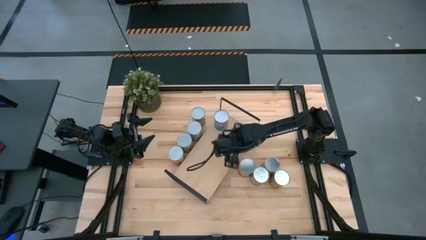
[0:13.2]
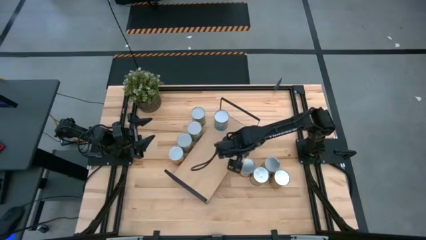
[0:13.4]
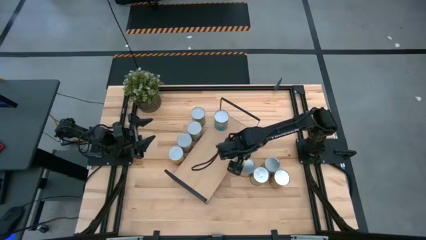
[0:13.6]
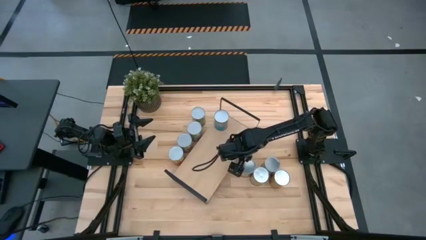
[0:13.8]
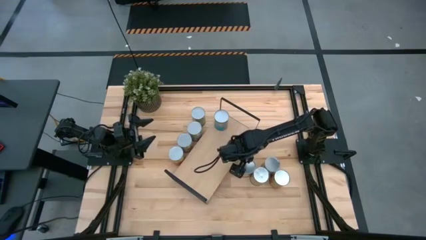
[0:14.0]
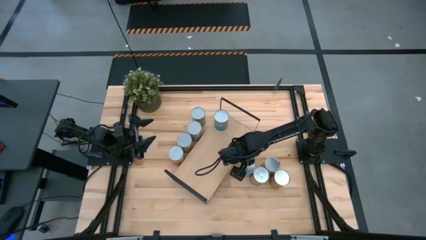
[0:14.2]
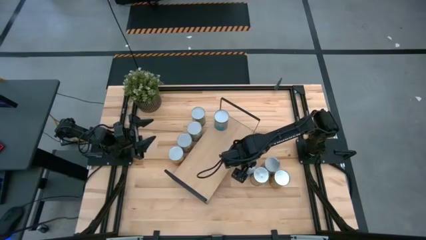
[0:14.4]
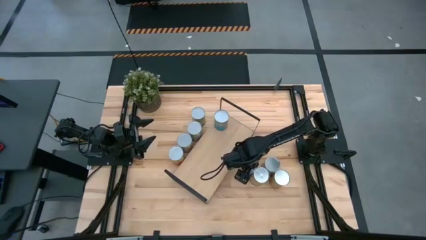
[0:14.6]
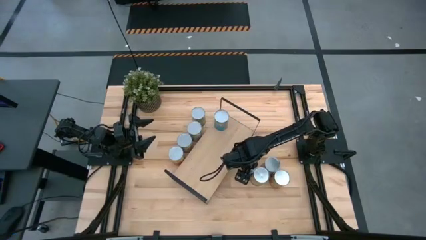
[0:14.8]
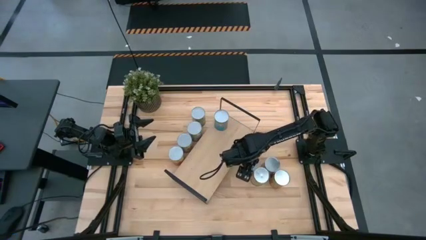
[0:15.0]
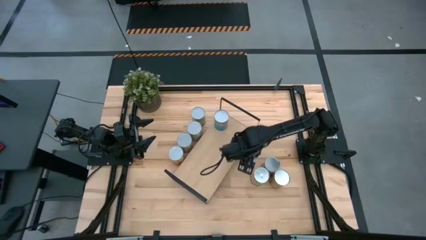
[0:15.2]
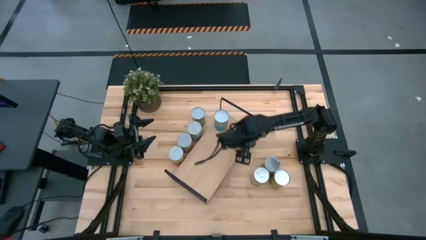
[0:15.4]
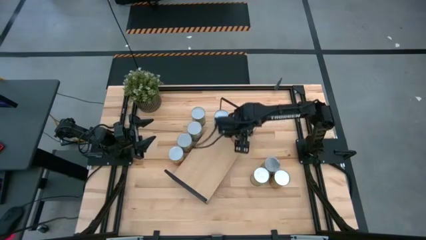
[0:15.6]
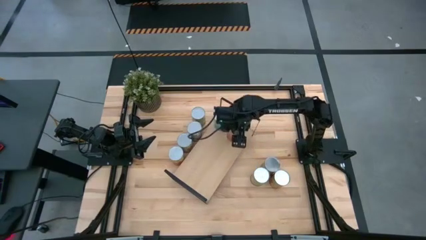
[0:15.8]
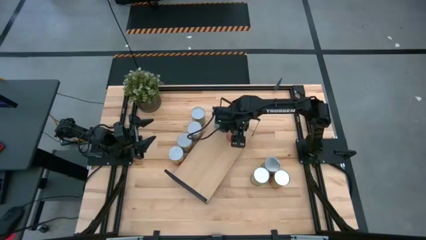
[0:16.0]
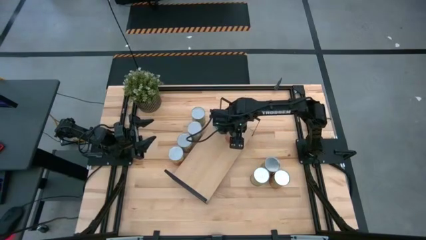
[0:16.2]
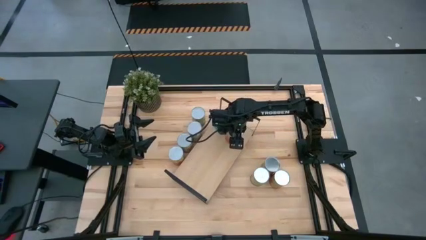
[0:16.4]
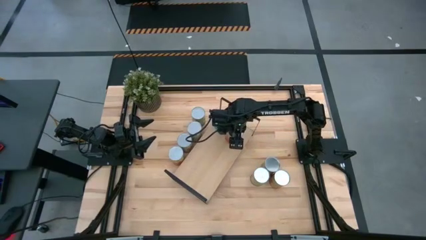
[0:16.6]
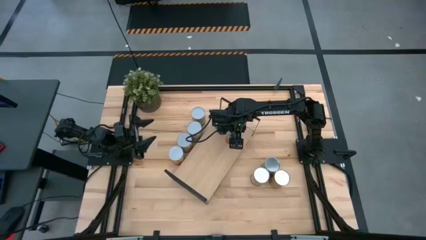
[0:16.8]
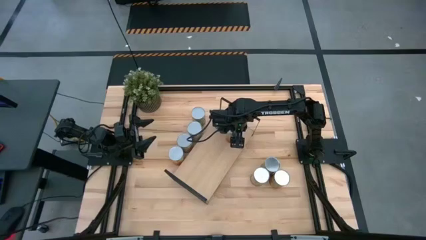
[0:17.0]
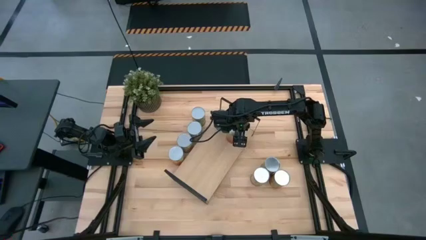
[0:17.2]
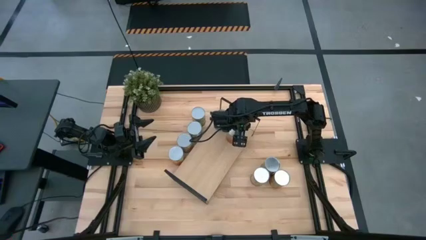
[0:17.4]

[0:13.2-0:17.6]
Task: Pick and place cans onto a shelf
Put the canned corn on the shelf

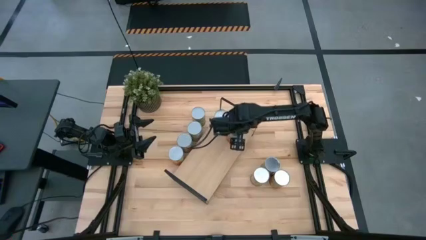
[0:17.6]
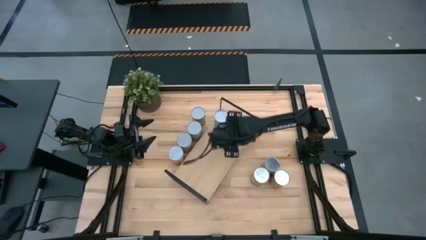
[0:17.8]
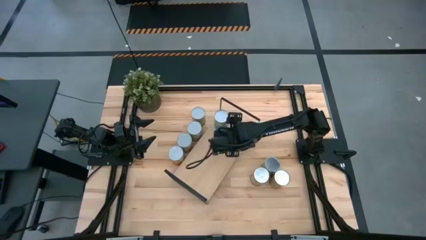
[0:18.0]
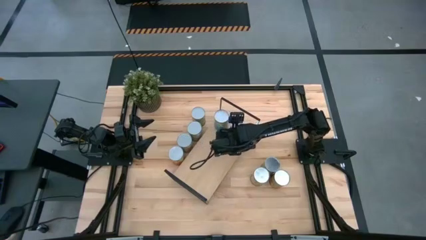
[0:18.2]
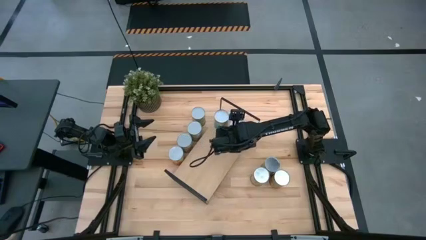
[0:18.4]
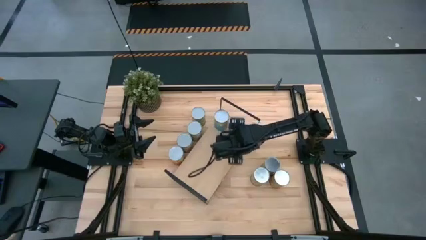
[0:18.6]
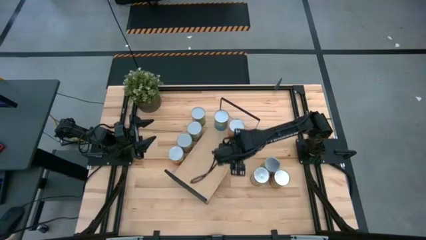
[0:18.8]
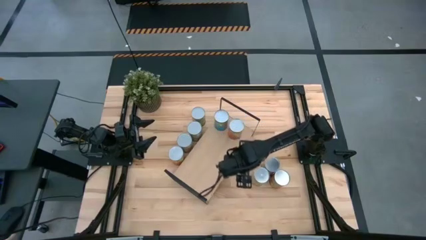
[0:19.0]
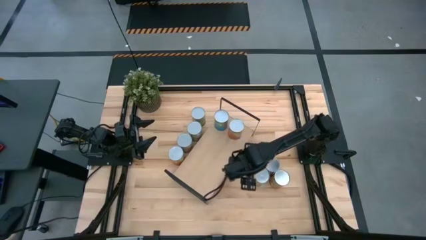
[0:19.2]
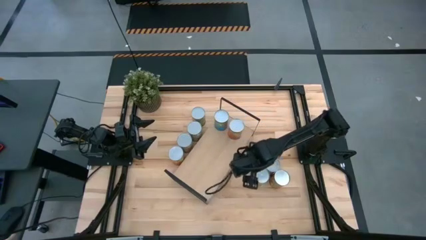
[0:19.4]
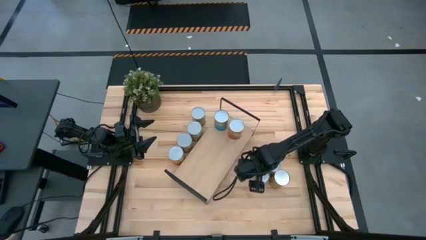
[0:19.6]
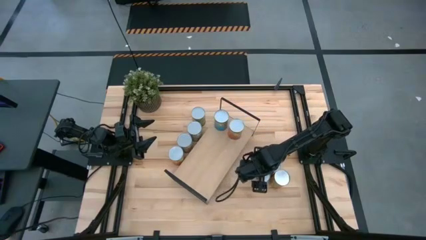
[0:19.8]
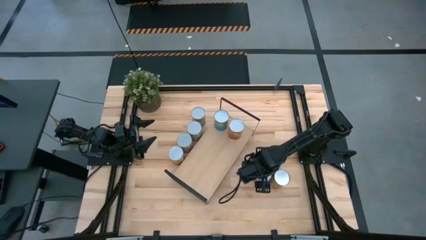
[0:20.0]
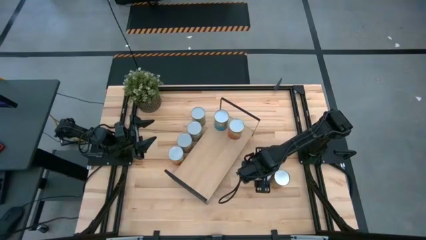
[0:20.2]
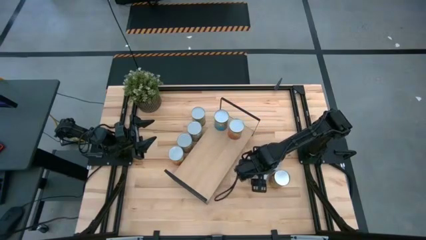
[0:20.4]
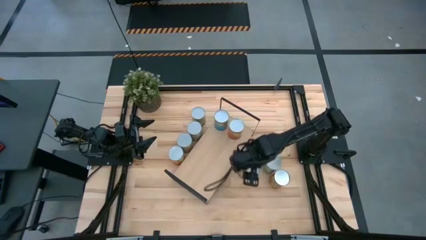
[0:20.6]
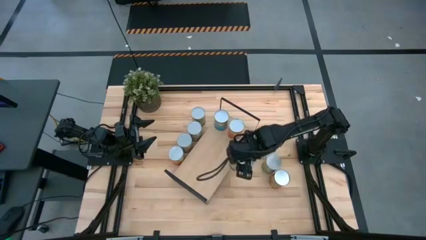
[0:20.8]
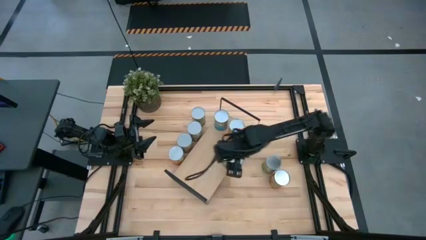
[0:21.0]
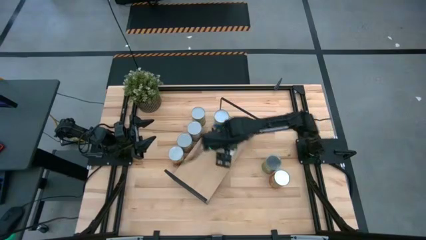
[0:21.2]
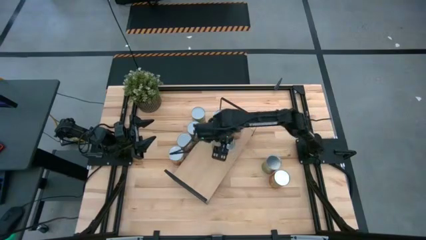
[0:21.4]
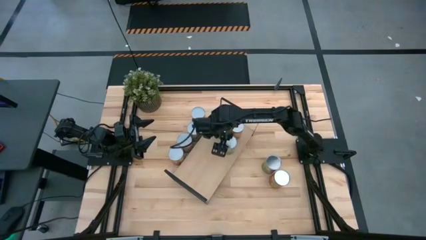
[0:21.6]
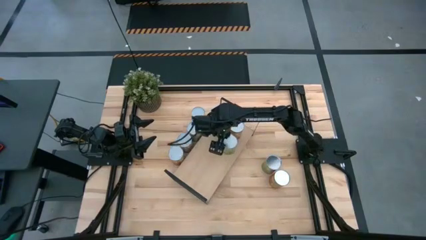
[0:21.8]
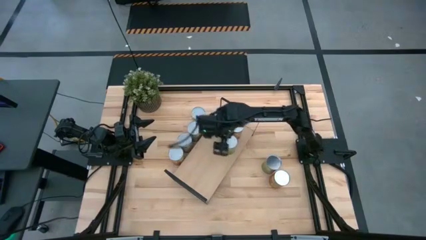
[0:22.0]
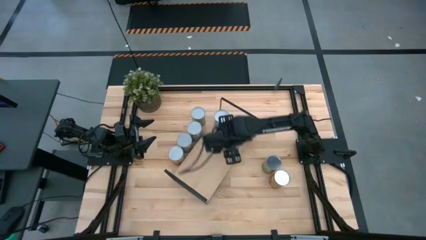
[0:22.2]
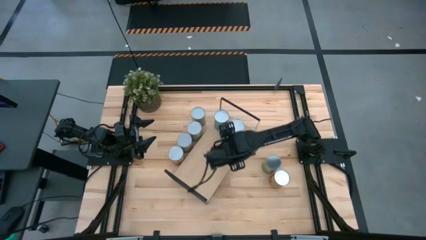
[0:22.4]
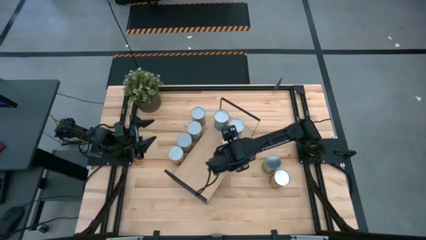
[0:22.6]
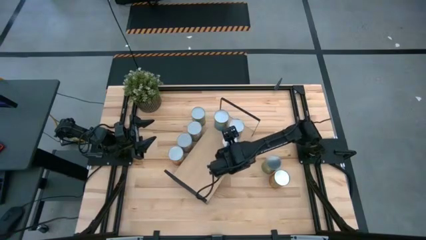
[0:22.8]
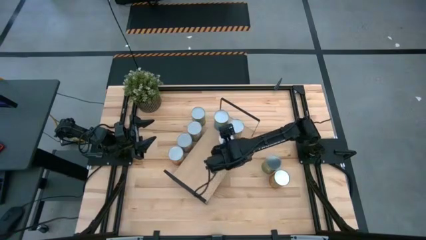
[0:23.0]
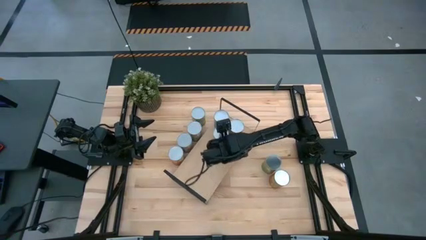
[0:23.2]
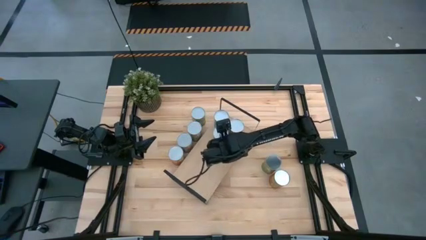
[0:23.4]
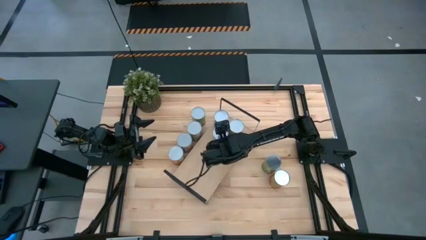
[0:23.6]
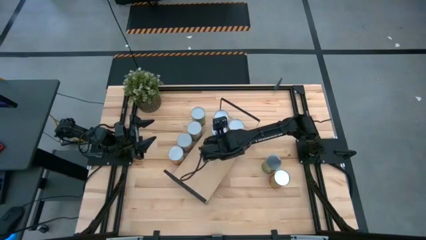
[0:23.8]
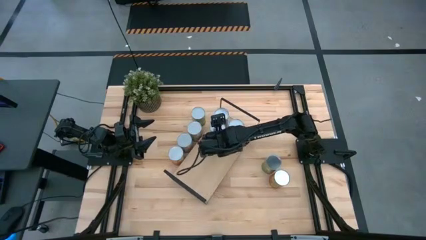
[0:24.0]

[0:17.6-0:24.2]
Put the left canned orange on the shelf

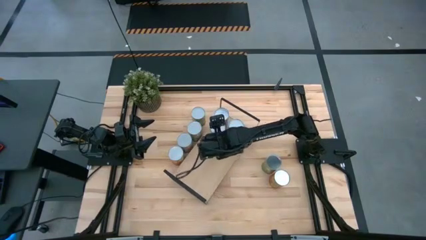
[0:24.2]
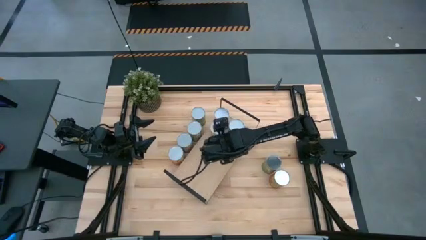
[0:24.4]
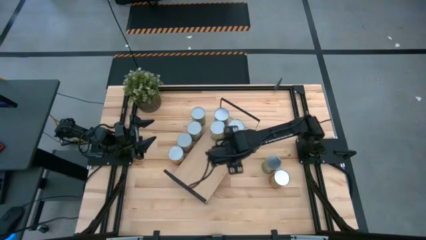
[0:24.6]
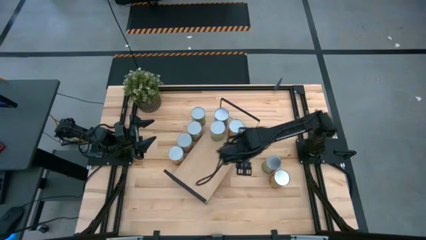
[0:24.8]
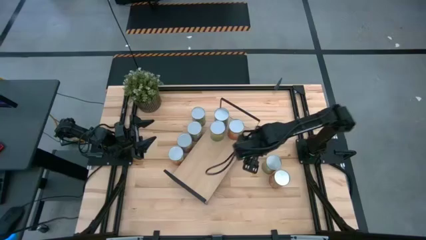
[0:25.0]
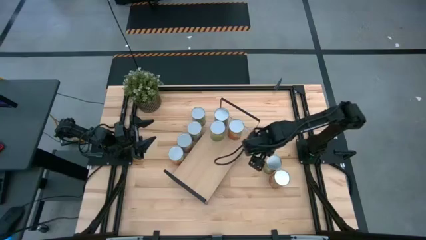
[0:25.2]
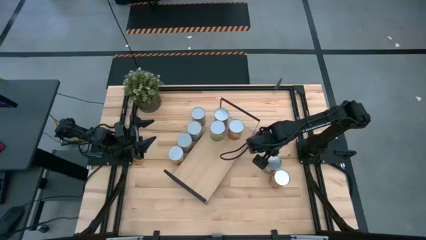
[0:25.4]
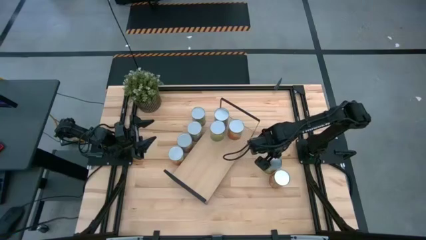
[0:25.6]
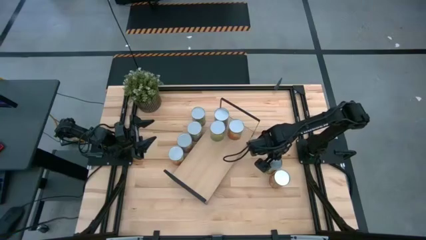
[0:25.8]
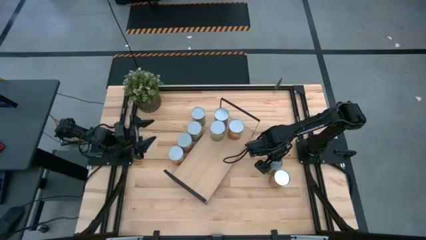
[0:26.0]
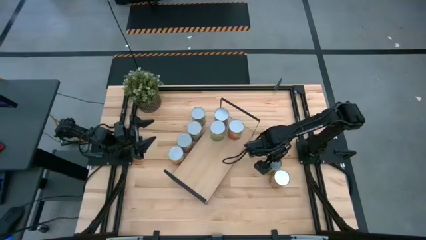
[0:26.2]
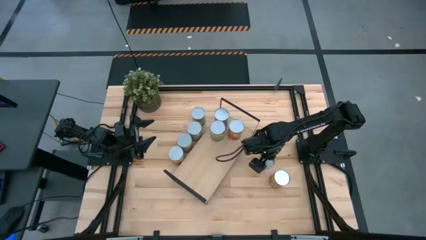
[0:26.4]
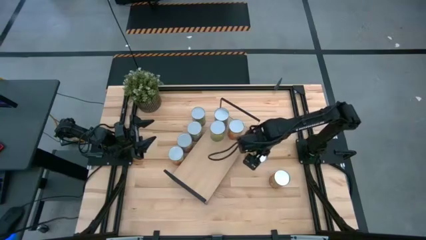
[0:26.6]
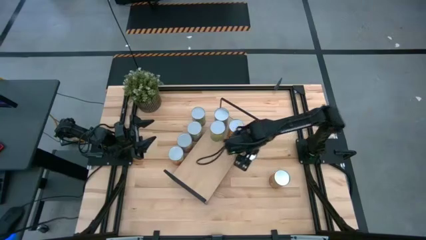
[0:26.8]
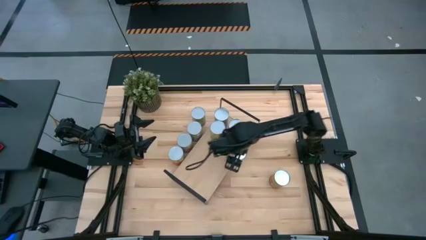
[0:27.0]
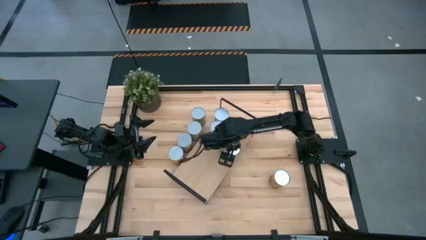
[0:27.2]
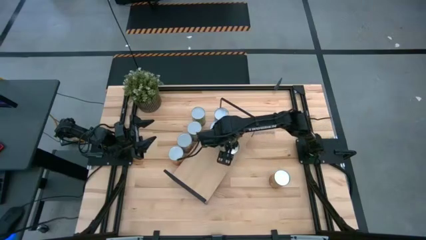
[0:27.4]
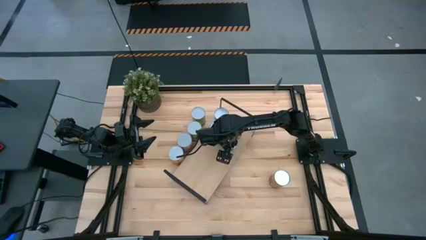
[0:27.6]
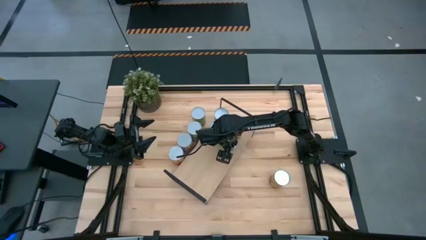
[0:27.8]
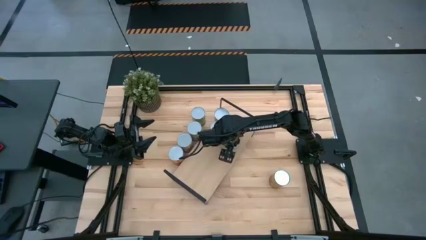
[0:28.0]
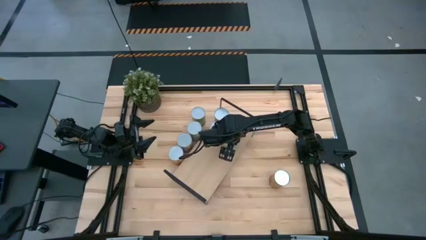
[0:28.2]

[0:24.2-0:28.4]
Put the right canned orange on the shelf

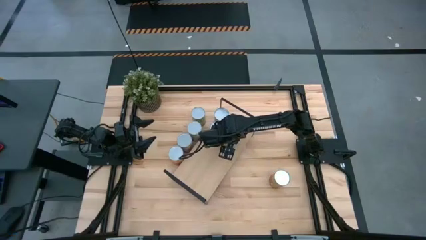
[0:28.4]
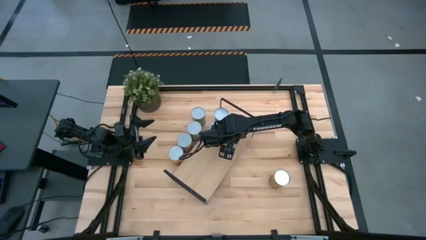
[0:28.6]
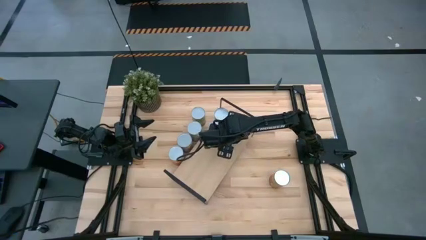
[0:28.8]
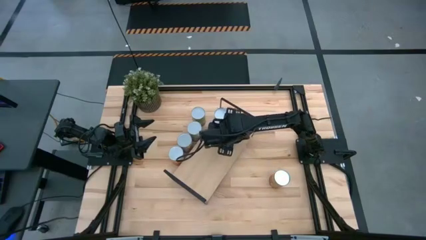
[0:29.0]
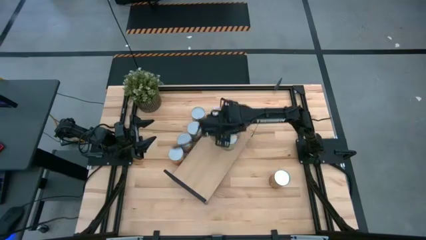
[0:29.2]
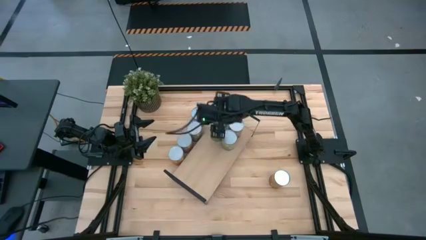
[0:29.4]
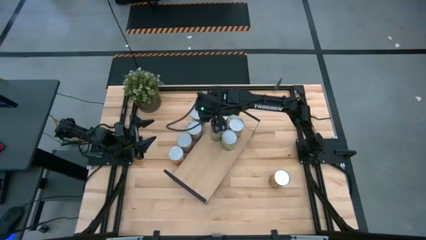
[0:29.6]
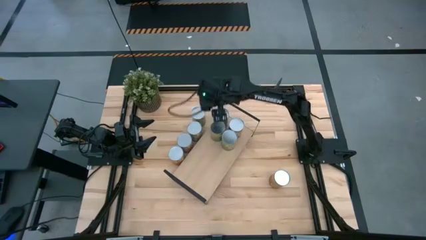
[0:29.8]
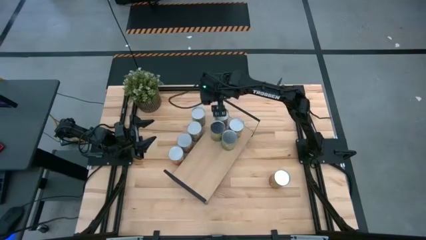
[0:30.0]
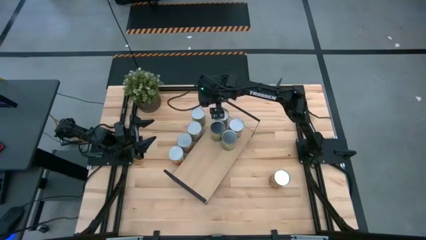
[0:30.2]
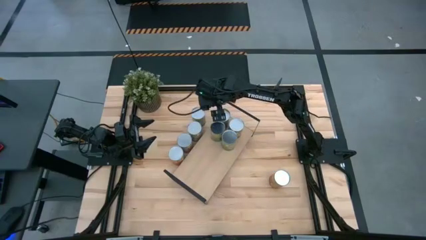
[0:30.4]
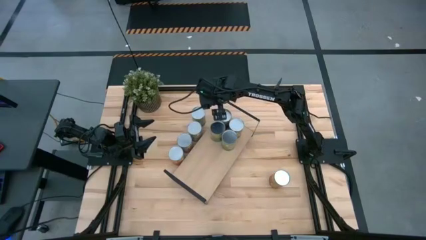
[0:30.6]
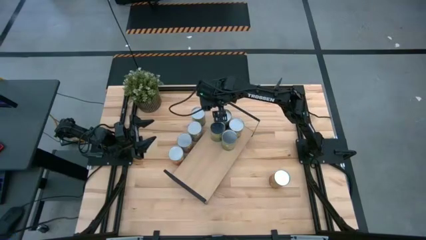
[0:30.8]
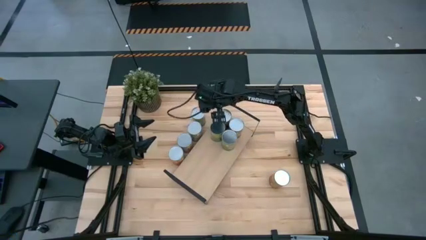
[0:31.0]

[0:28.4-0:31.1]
Adjust the canned cherries on the shelf
